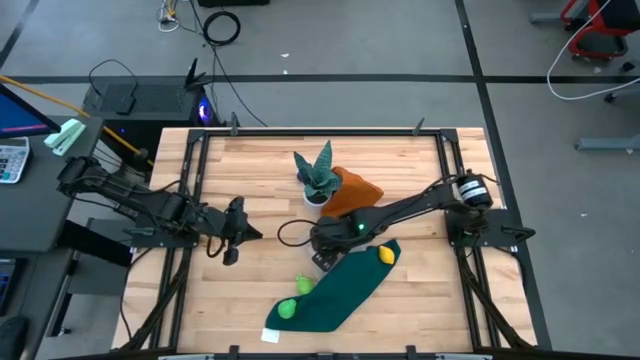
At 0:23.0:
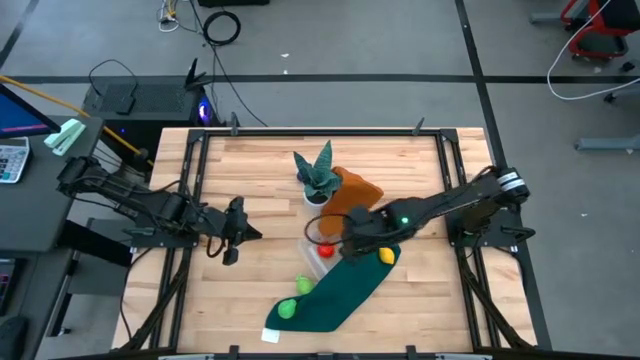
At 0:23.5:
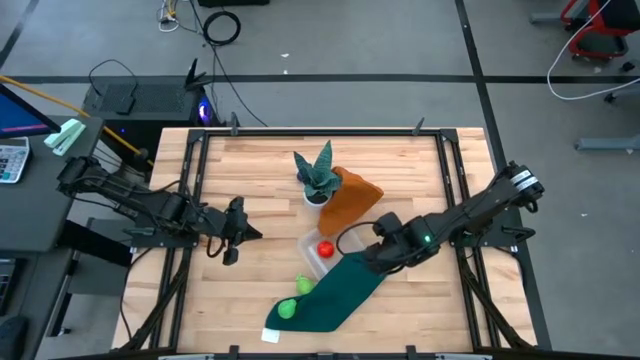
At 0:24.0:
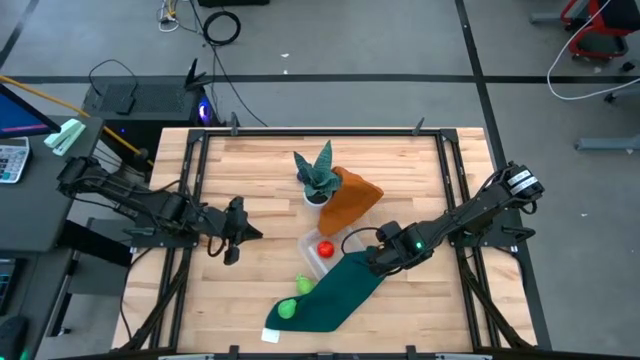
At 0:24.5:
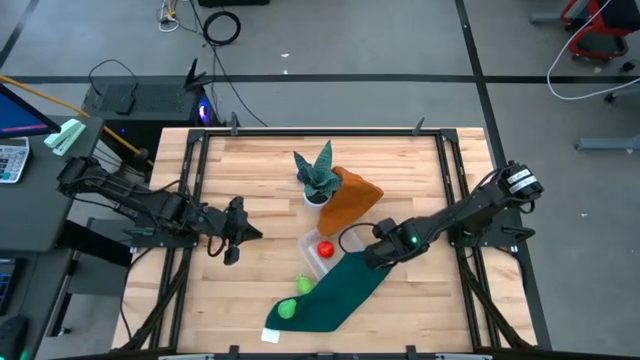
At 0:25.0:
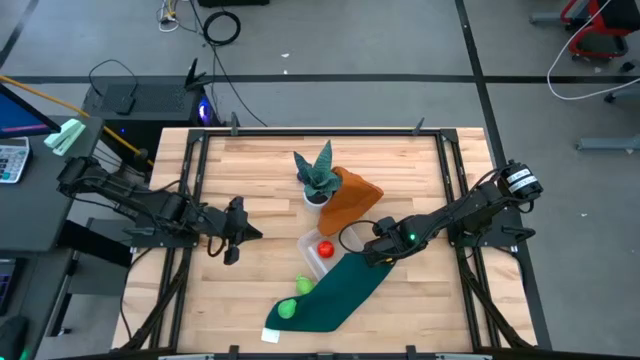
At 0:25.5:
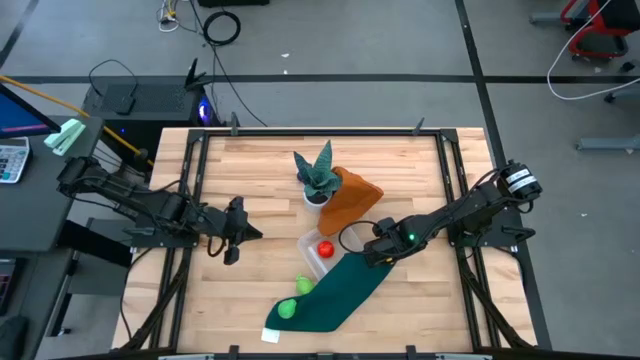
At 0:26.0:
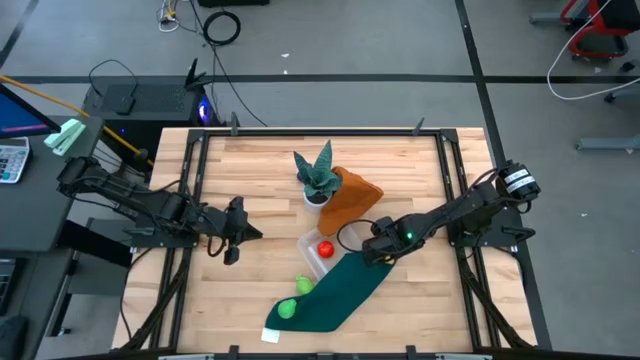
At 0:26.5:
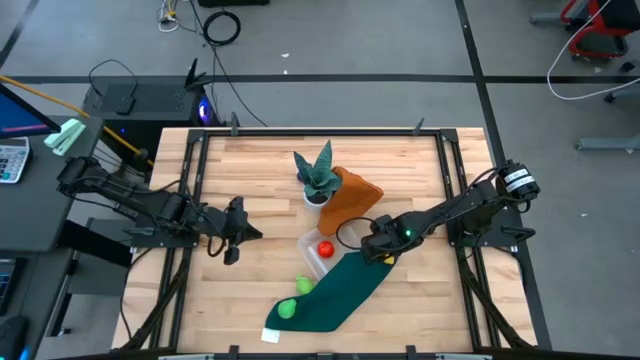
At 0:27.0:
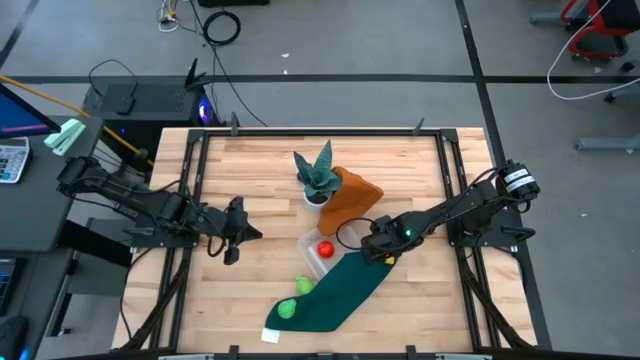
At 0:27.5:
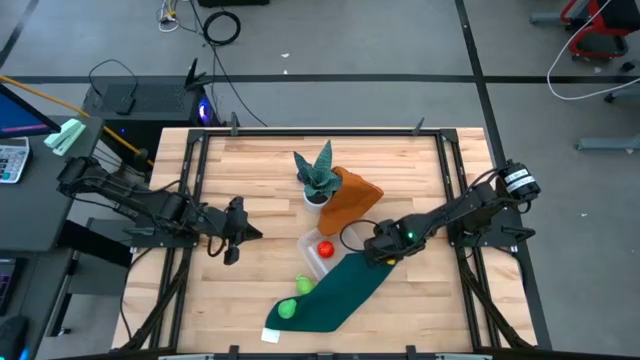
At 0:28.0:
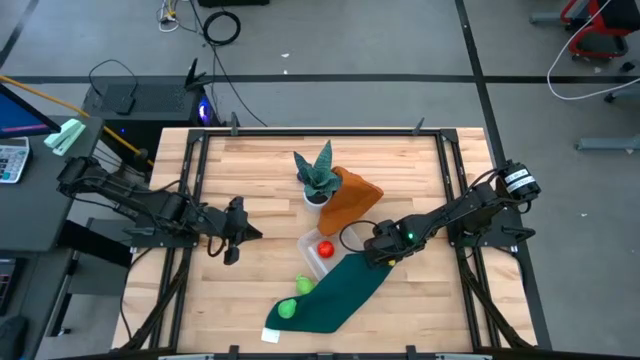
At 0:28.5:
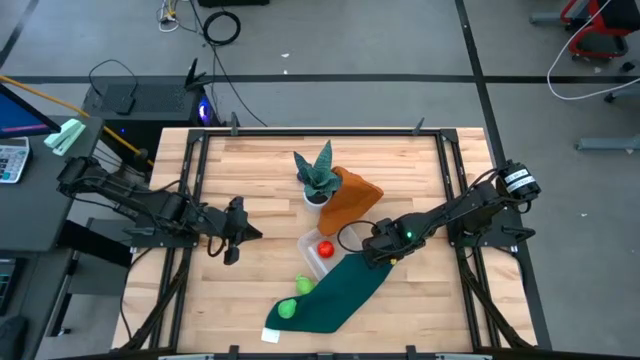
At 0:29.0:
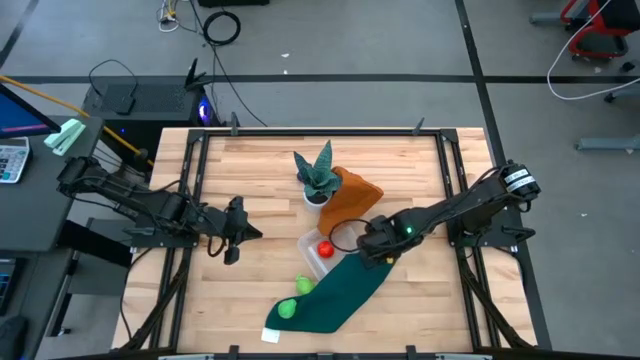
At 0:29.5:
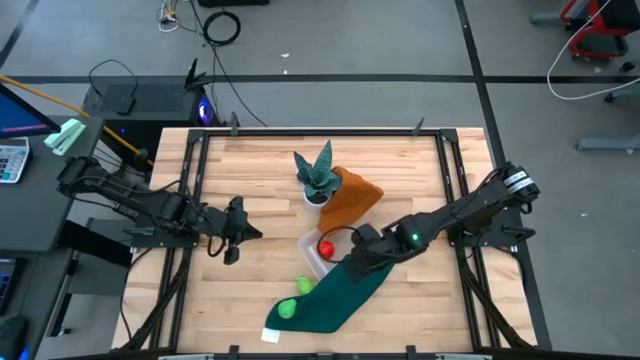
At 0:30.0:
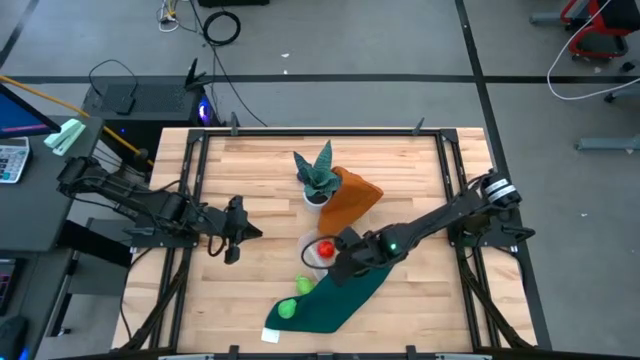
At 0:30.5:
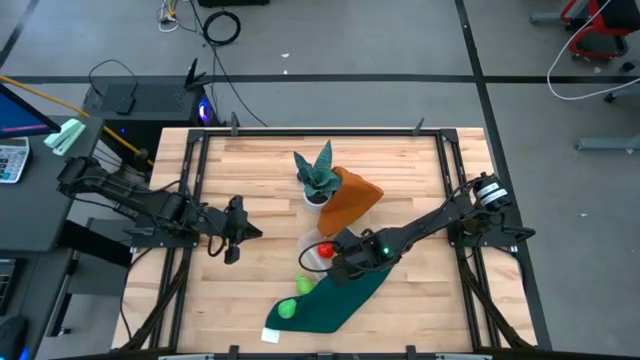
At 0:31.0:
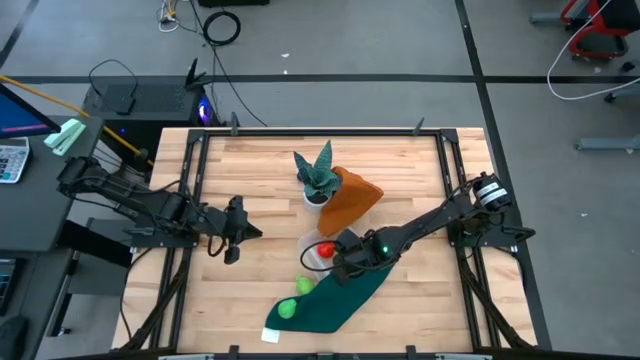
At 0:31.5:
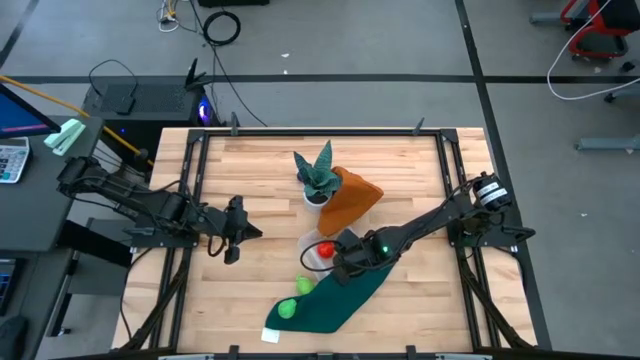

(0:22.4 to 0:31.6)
Task: Pick and placing Produce into tupperware
Put the yellow lemon into the transparent bin

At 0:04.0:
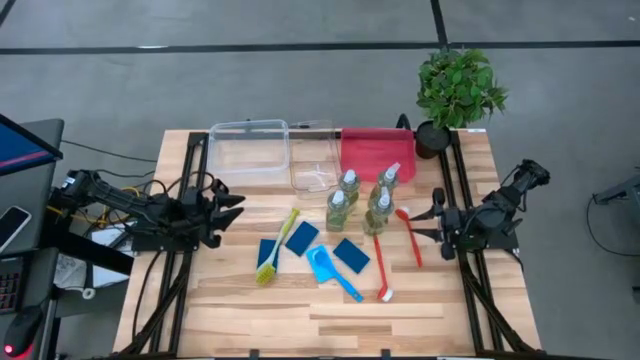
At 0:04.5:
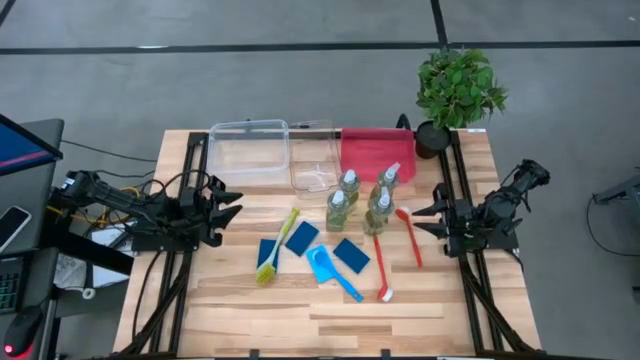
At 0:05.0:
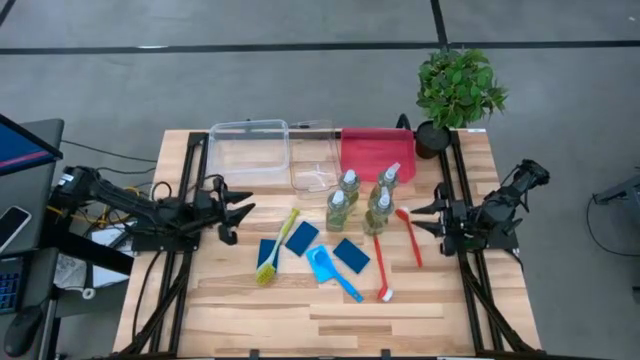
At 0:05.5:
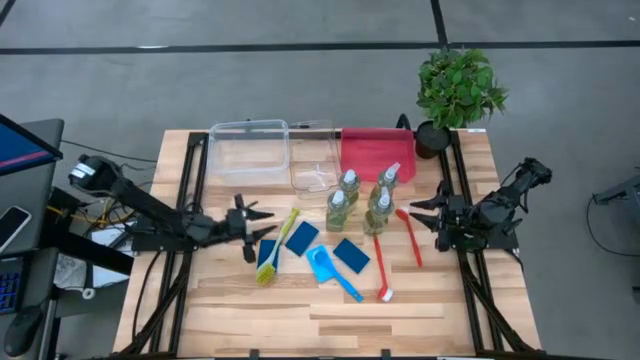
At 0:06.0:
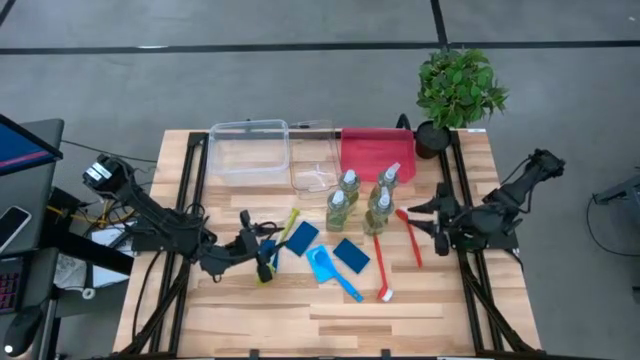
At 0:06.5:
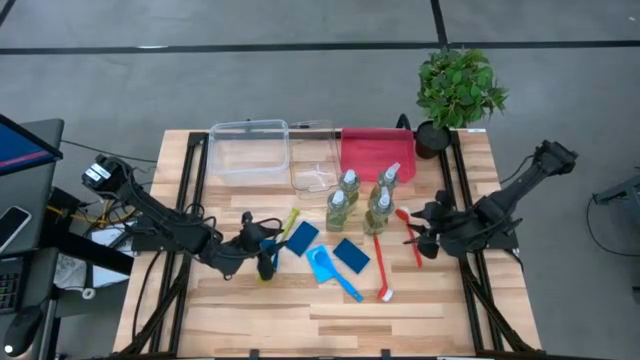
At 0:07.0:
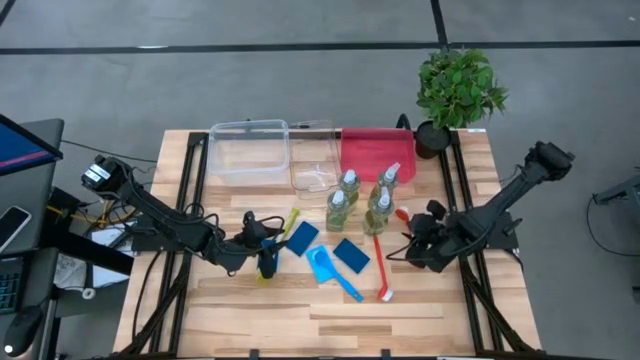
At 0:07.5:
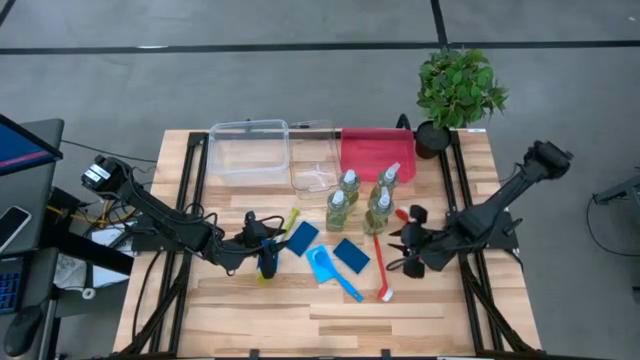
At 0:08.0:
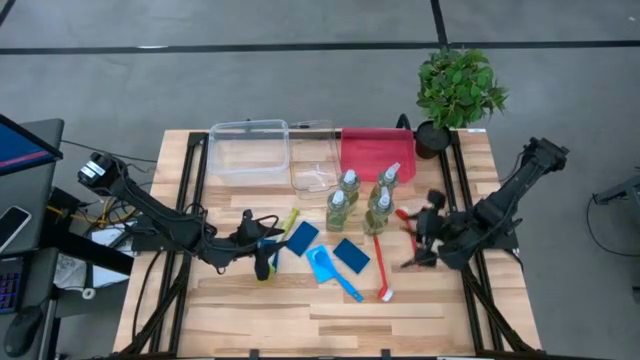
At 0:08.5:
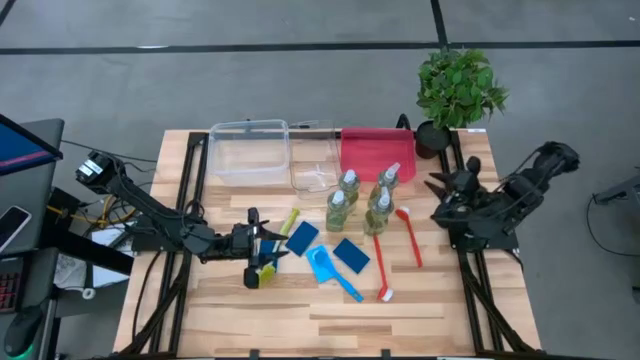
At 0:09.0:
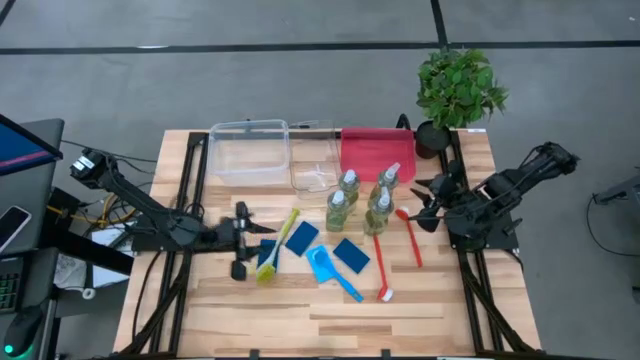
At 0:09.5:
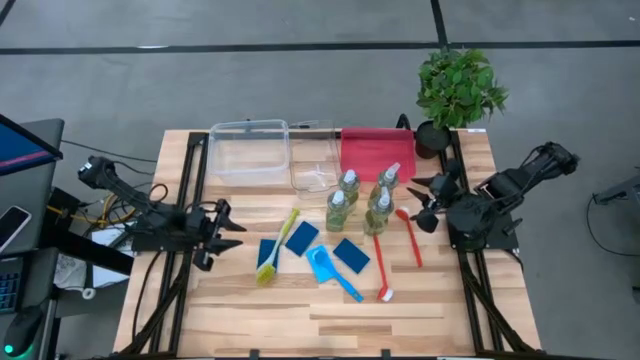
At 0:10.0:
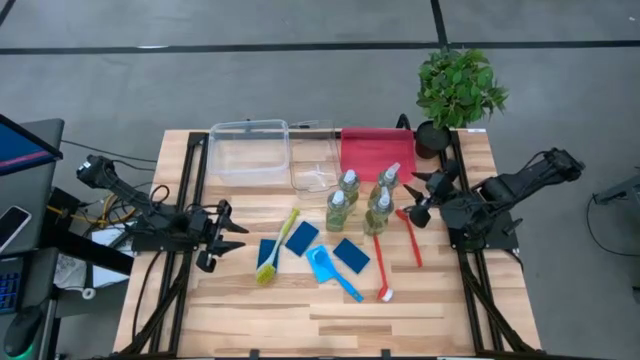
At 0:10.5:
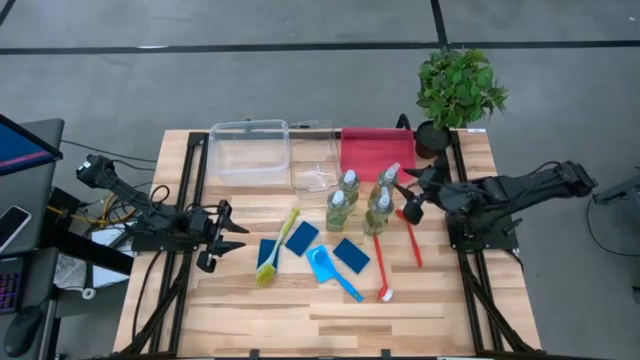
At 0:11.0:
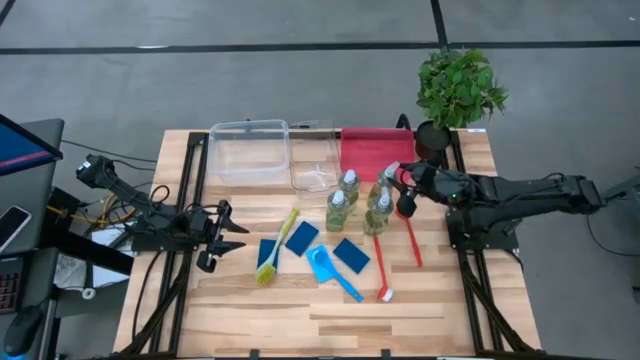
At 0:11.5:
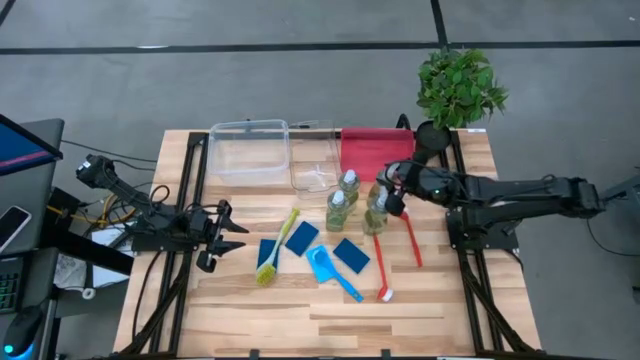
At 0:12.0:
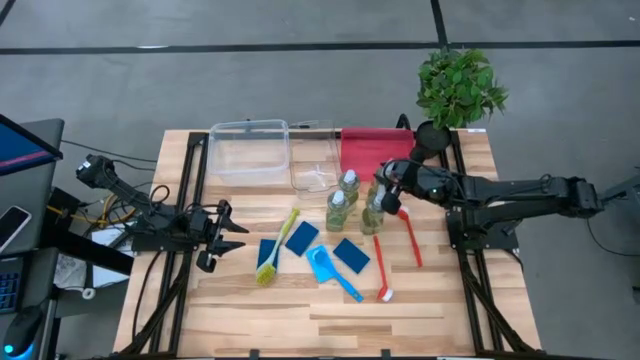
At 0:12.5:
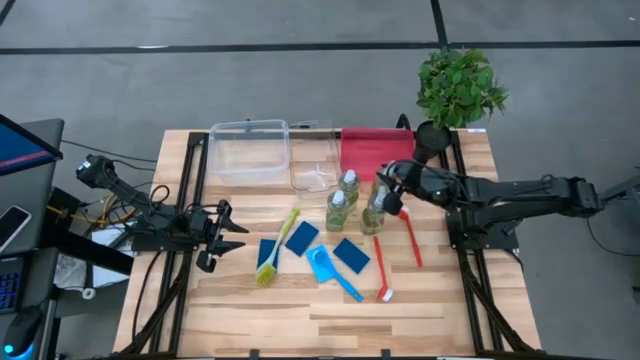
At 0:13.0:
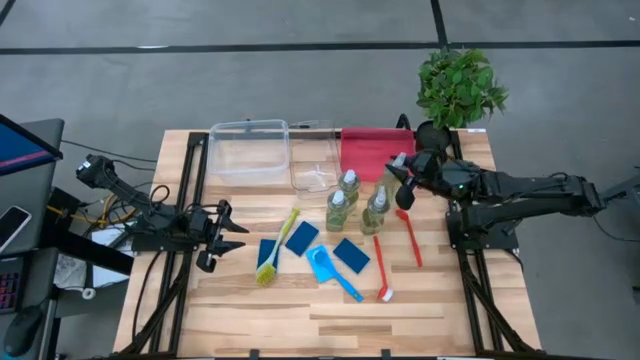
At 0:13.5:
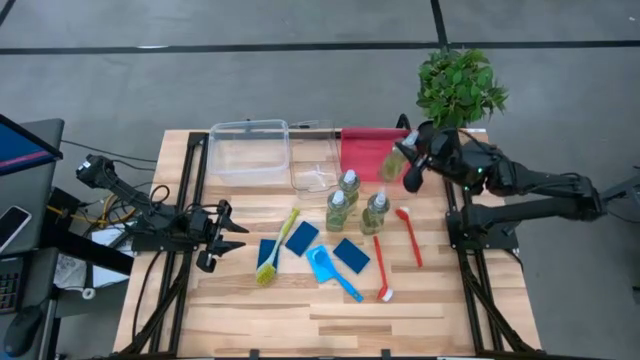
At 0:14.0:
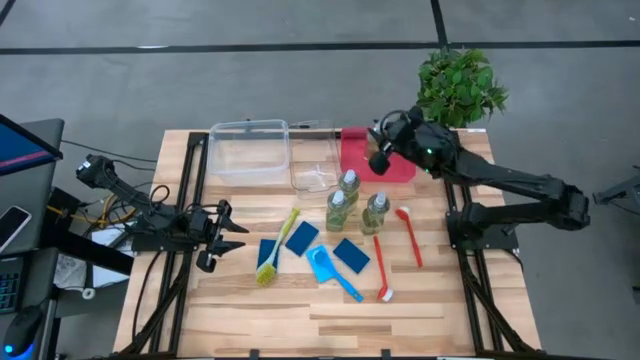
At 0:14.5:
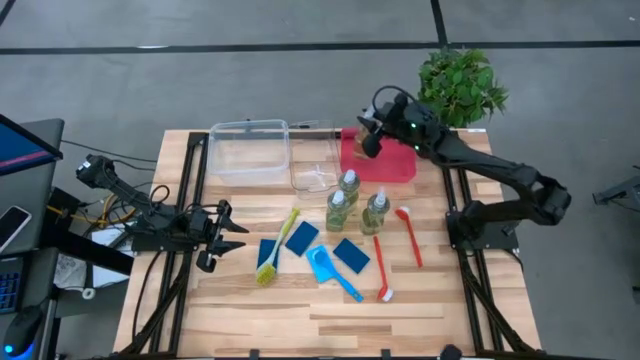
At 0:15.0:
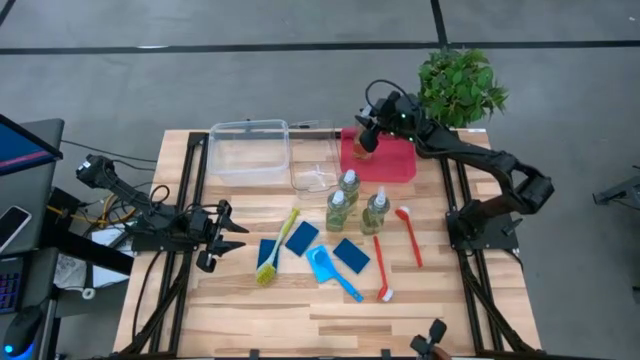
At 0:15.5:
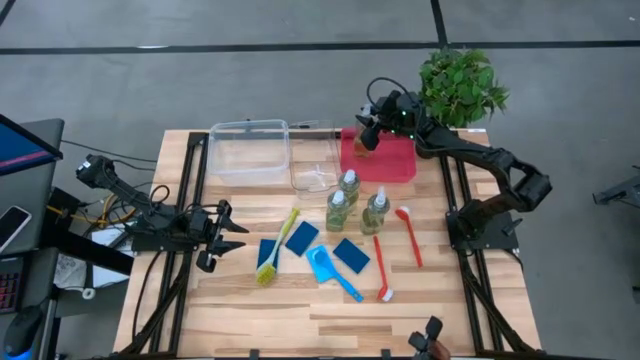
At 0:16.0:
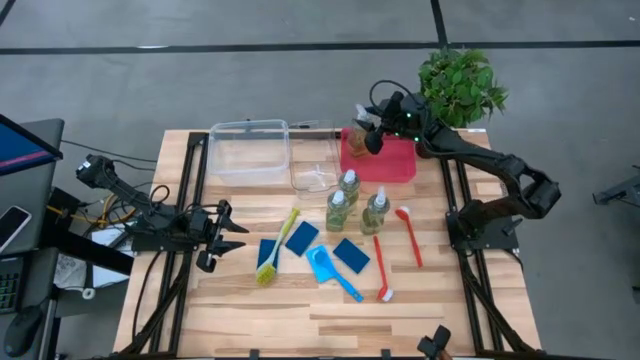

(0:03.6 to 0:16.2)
Task: Pick & Place Kitchen Sink Supplies
Put the soap dispenser into the red bin
